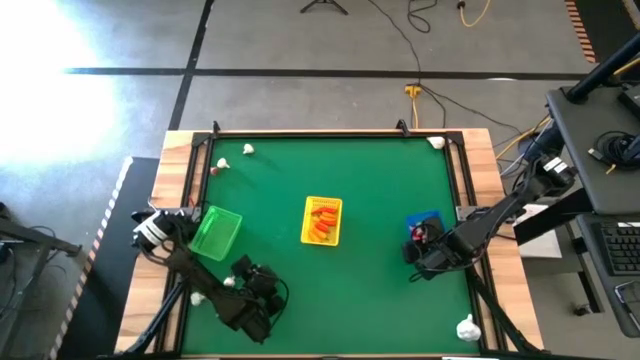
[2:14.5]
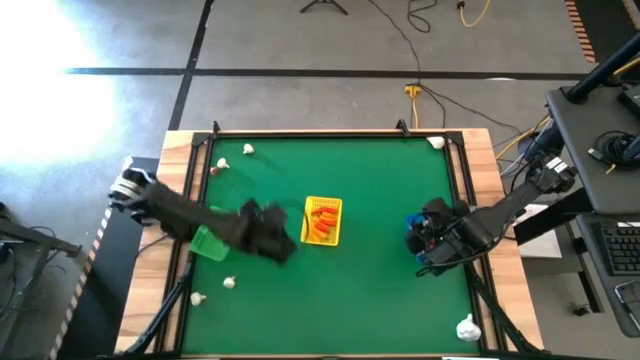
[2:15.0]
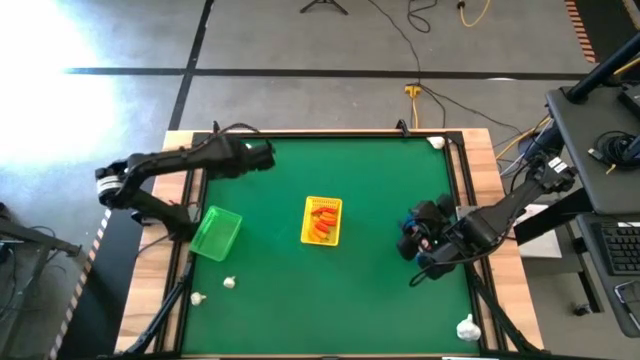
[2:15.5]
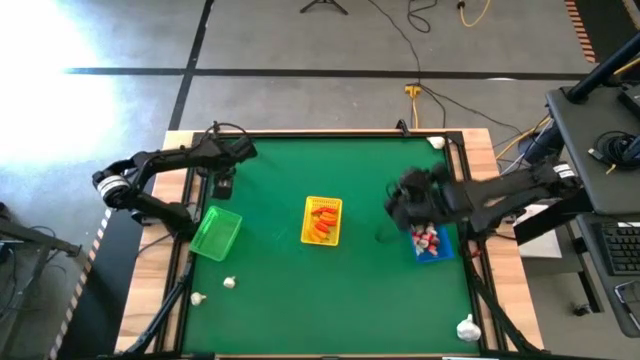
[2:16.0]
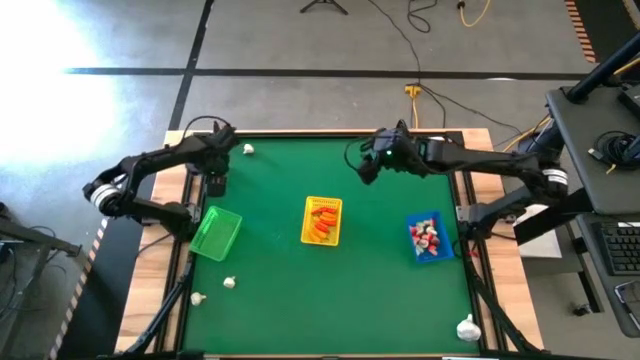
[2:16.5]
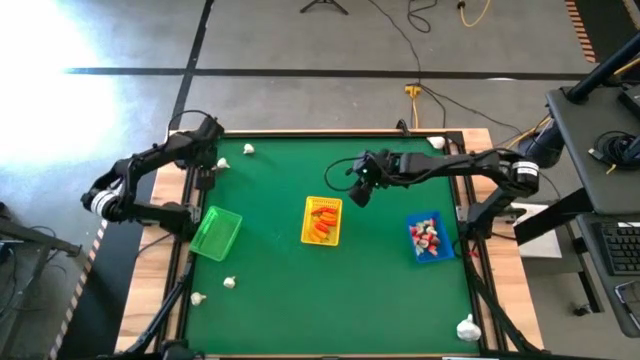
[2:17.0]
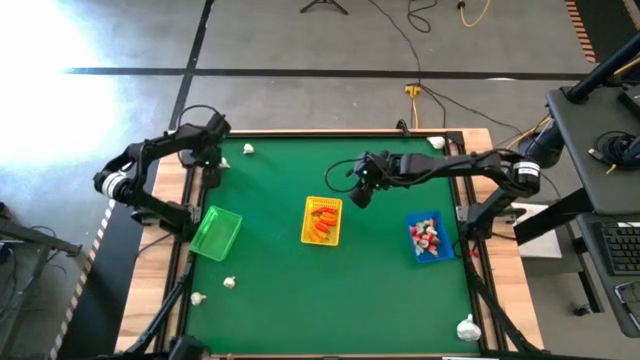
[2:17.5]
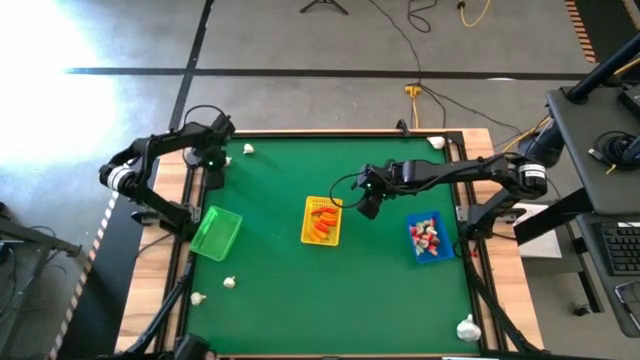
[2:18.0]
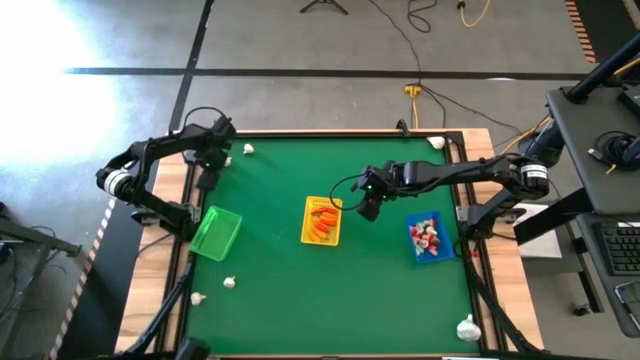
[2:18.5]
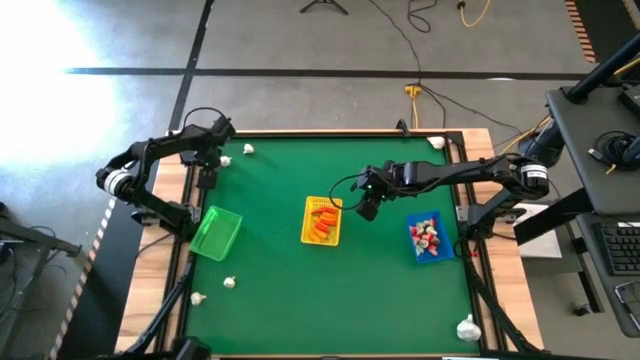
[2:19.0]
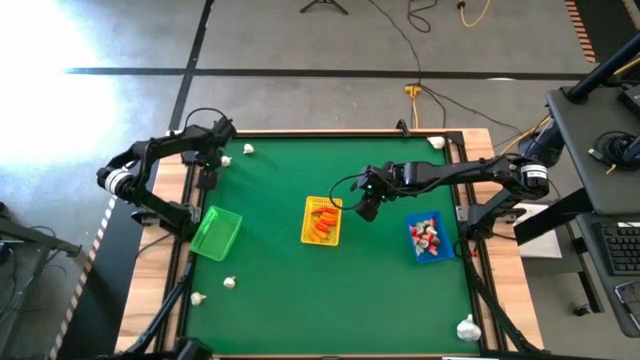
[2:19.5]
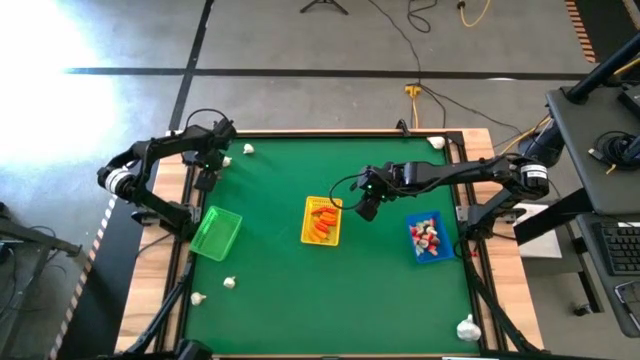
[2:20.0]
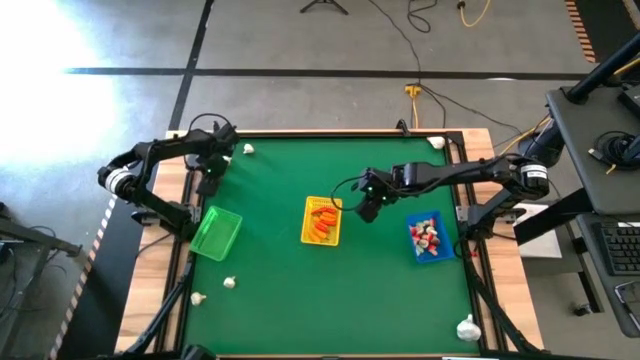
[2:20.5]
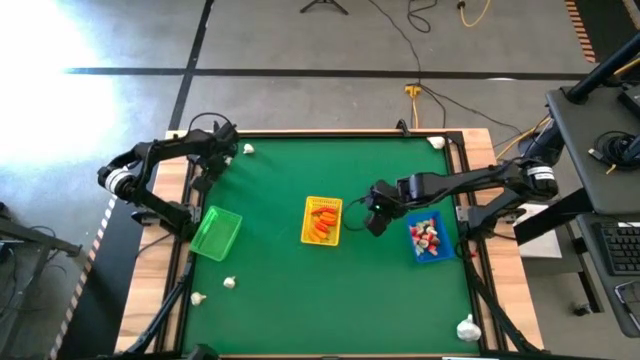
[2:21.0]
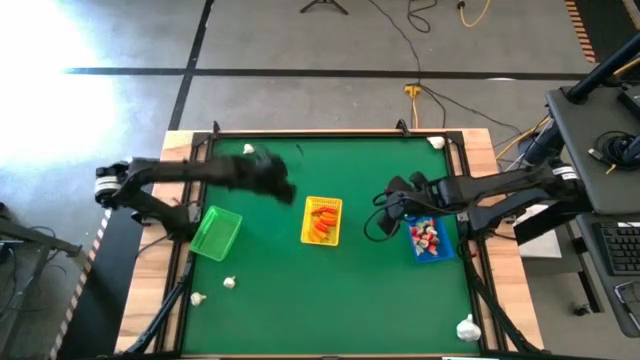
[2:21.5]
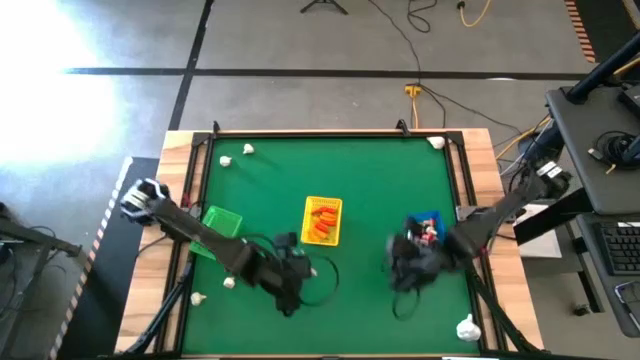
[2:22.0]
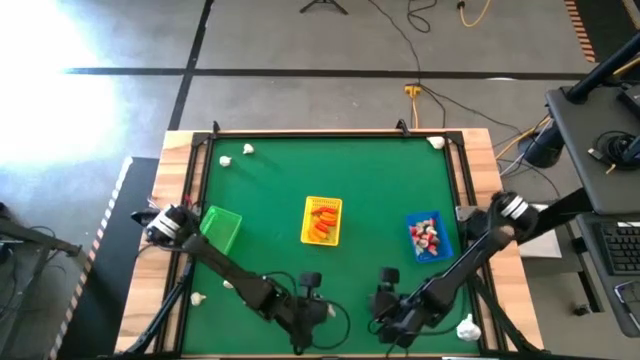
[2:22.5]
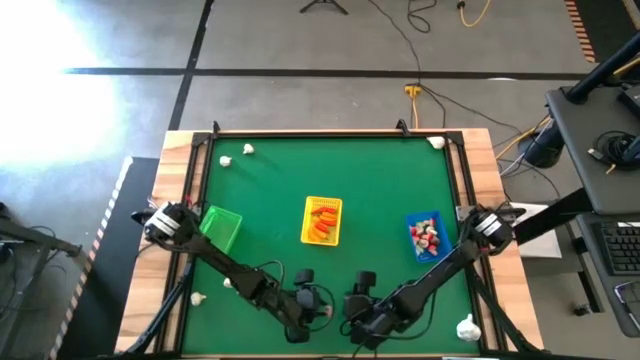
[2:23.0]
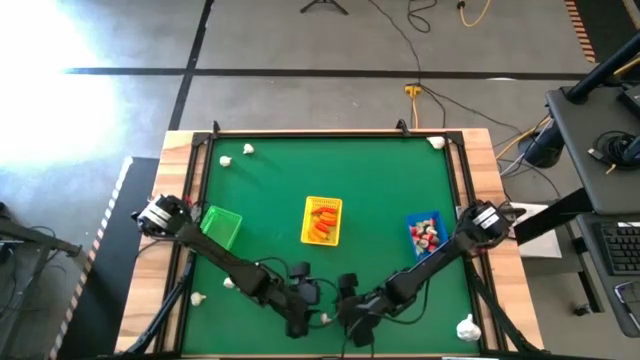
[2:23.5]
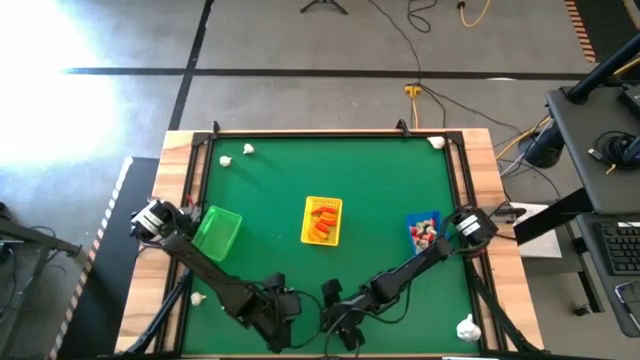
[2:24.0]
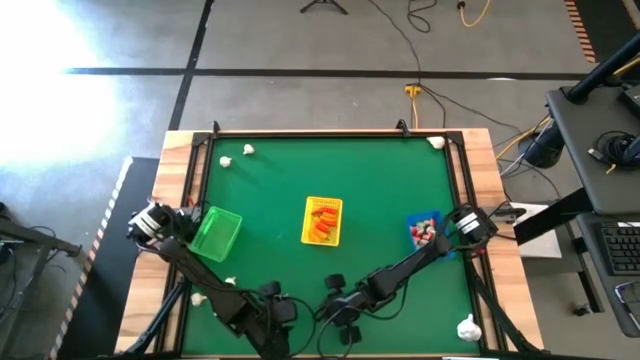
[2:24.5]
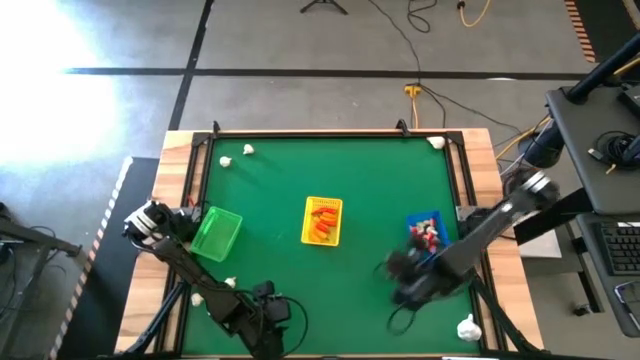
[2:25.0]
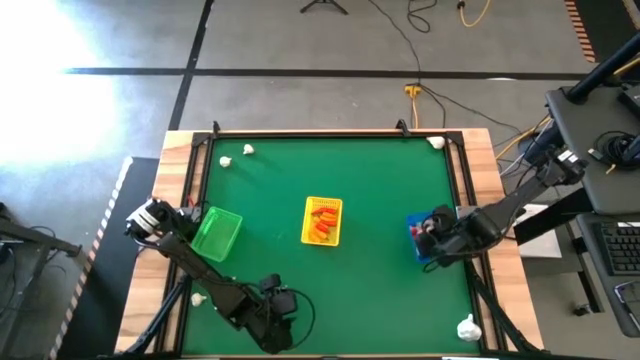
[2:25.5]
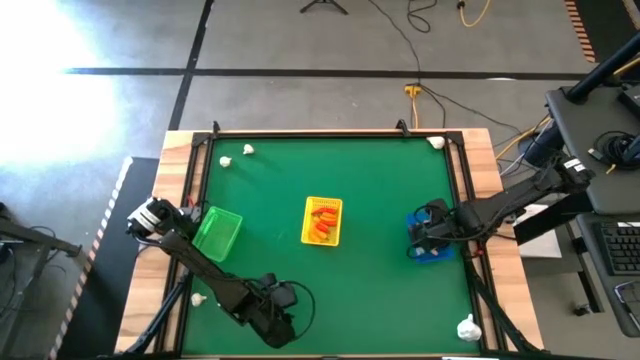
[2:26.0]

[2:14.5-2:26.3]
Task: Sort produce into baskets
Put the brown mushroom into the blue bin

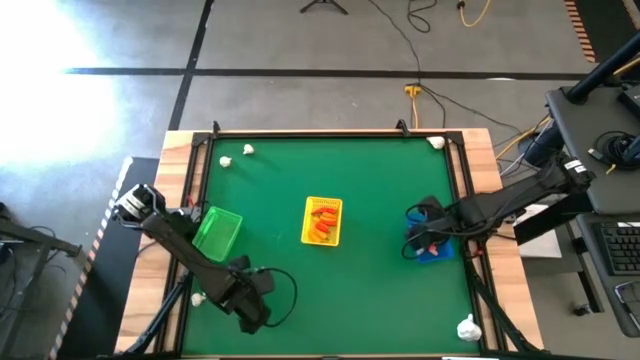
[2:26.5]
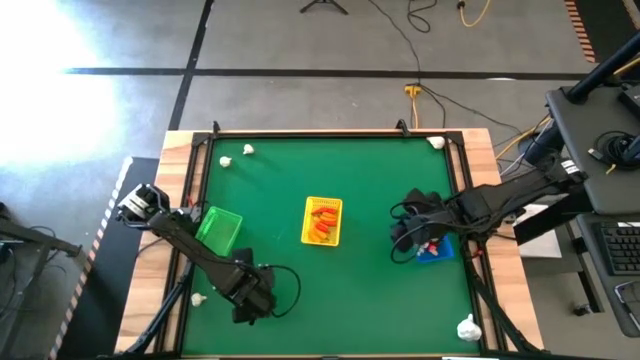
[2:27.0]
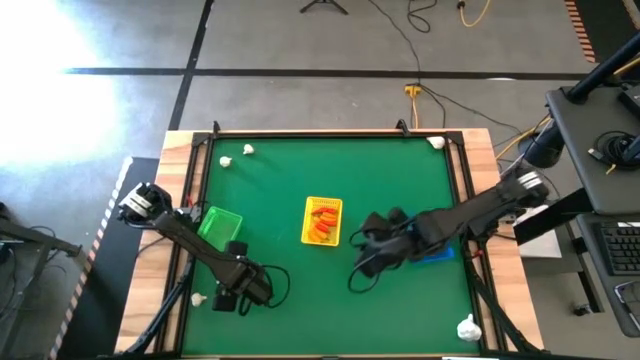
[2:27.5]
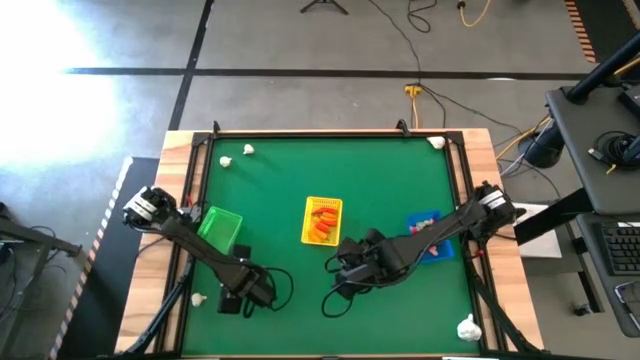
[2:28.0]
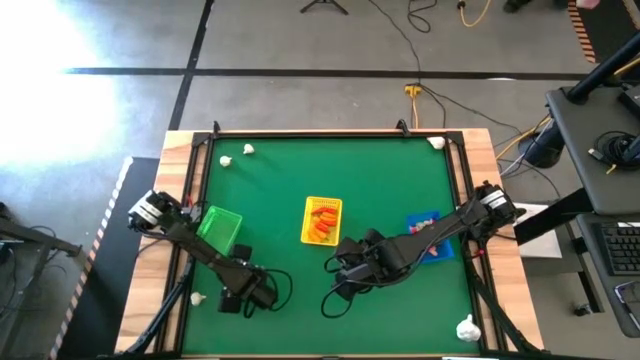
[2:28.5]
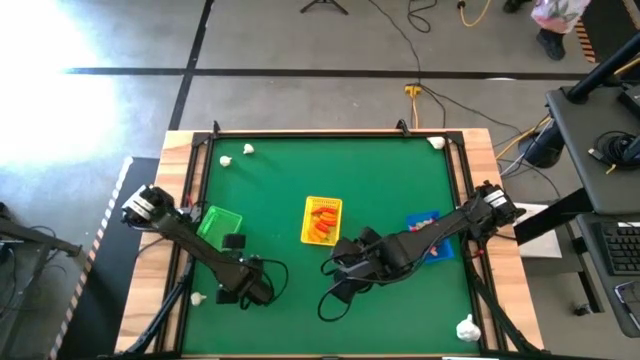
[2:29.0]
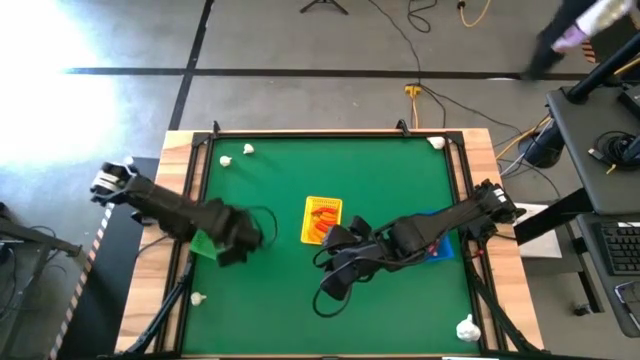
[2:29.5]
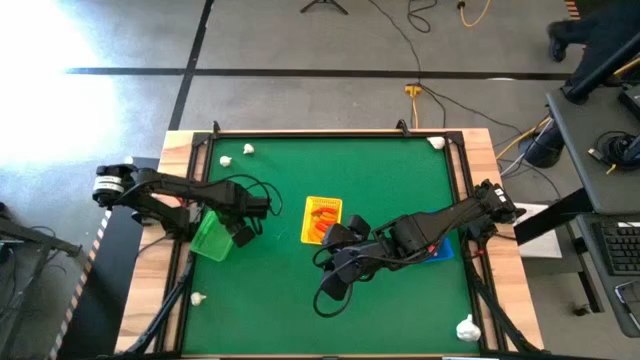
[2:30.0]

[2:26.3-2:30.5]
Put the white garlic into the green bin

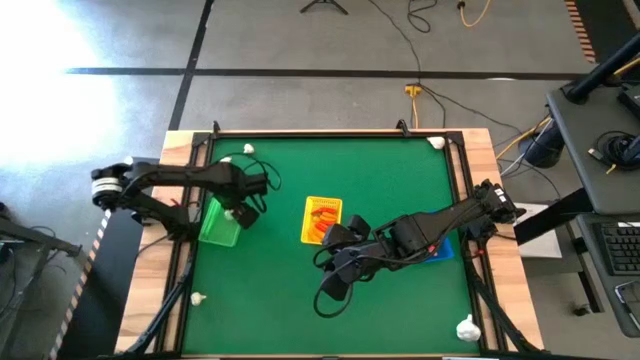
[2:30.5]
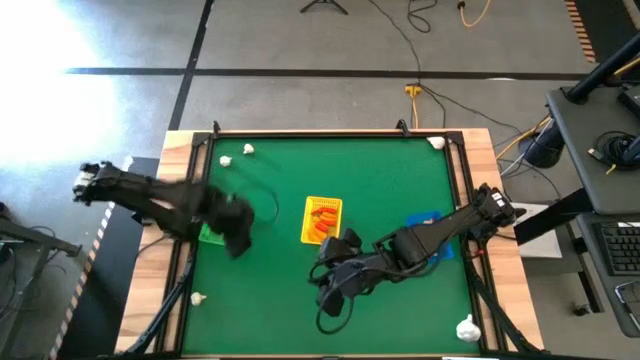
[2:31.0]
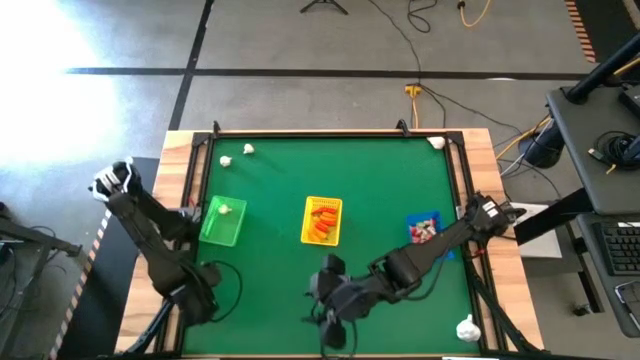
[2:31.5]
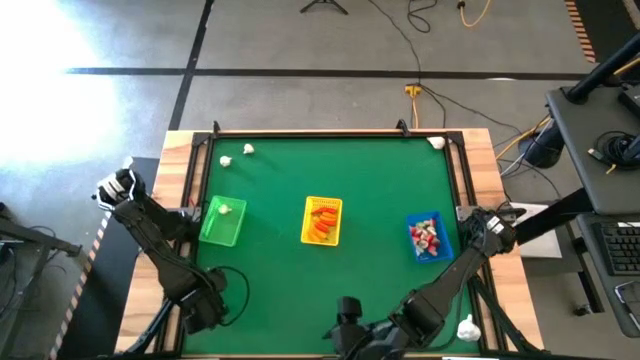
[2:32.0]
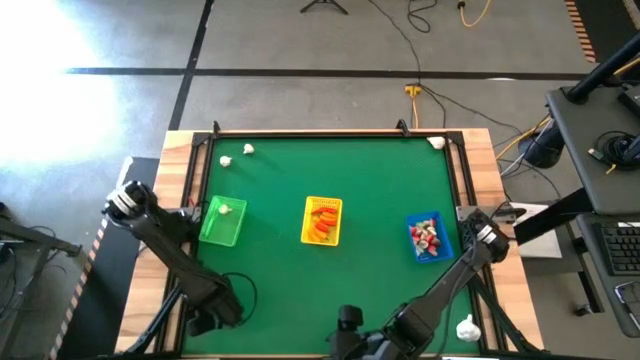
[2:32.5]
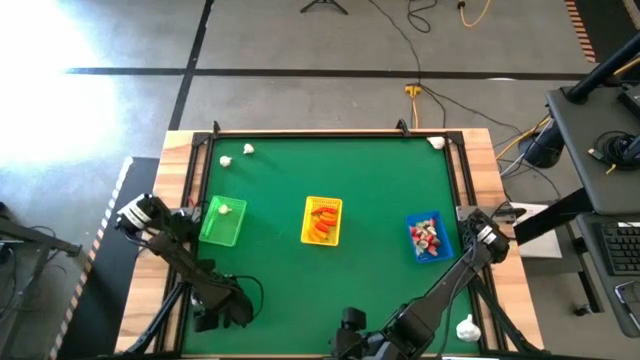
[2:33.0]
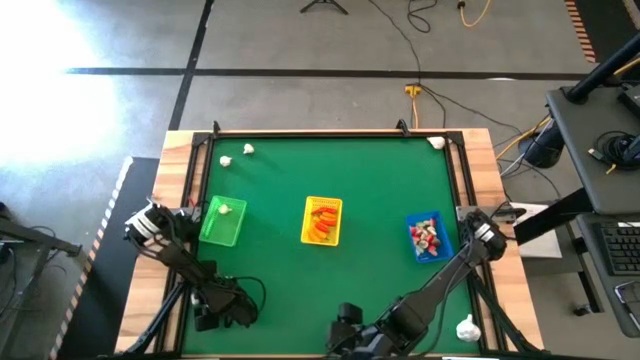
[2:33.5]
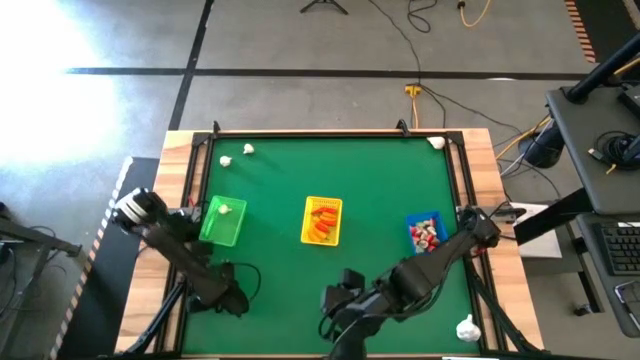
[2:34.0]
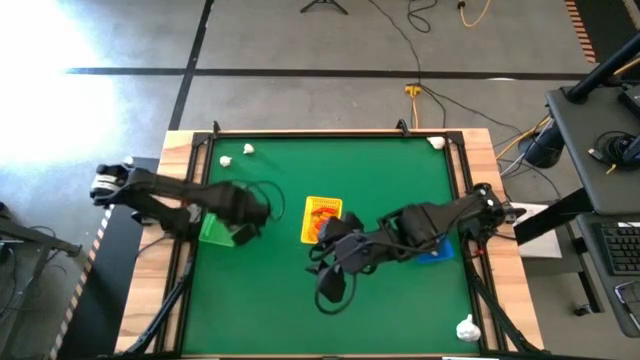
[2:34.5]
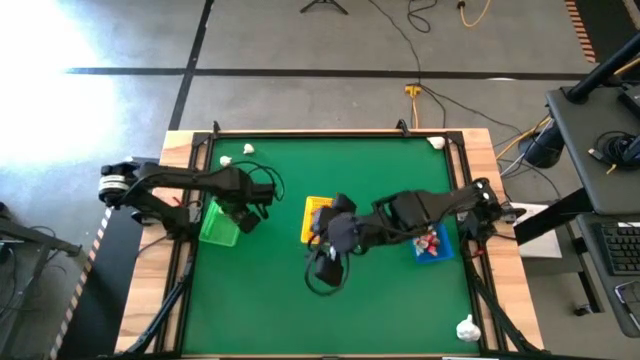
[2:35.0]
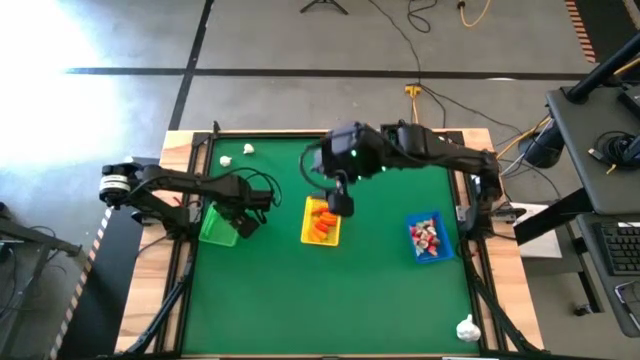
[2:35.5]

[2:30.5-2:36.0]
Put the white garlic into the green bin

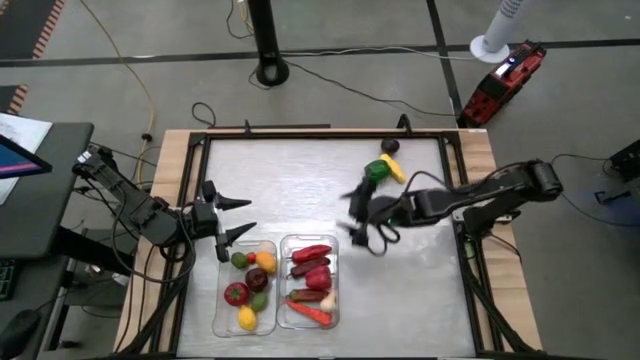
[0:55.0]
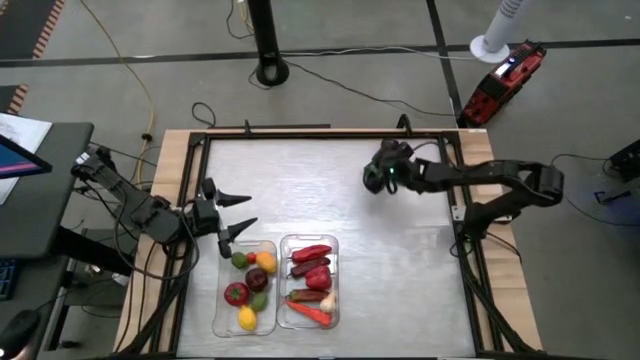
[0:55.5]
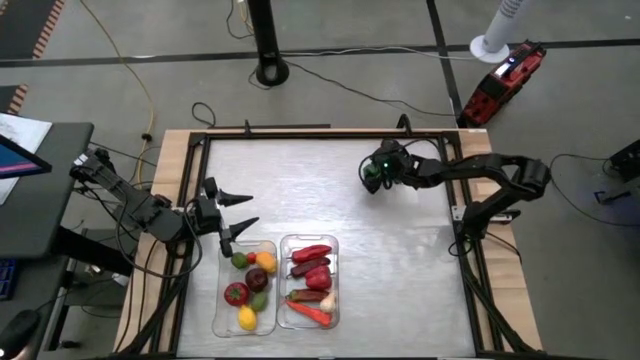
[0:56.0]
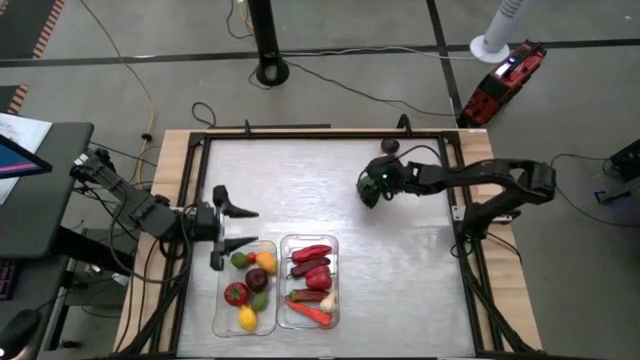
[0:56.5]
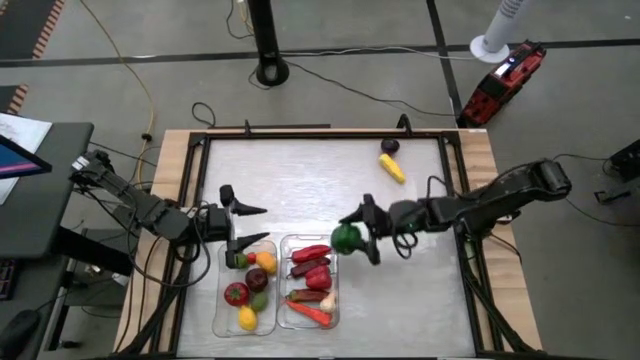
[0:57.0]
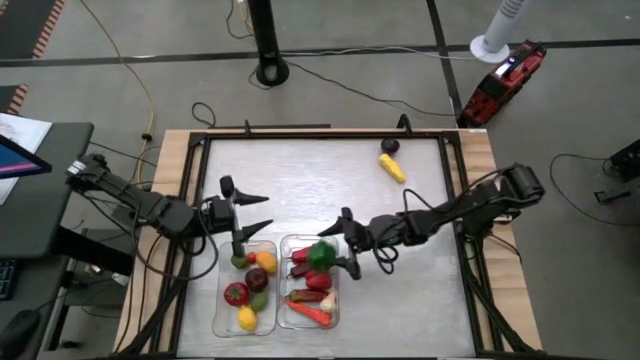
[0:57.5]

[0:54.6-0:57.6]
Task: Sort produce into baskets
Put the green bell pepper into the right transparent bin
